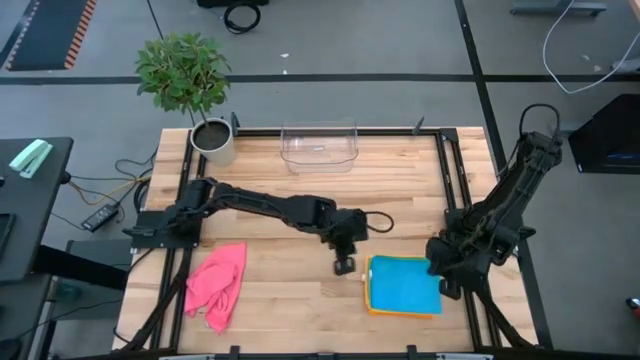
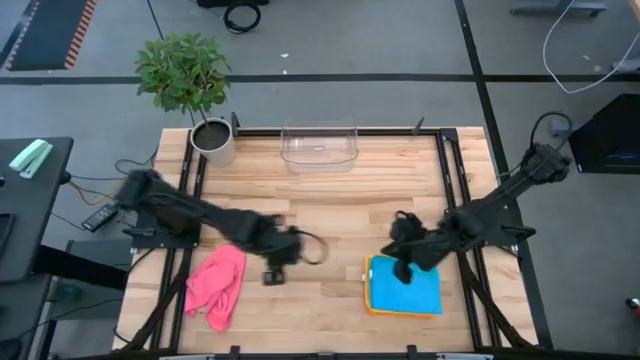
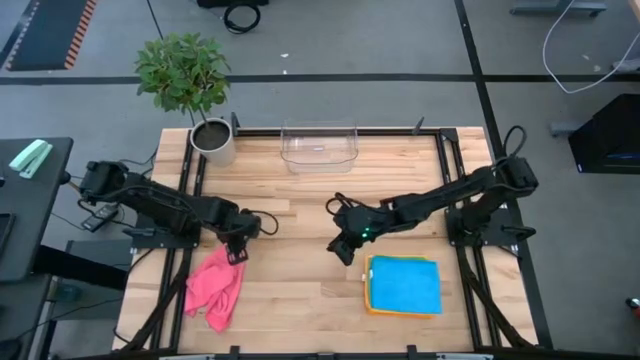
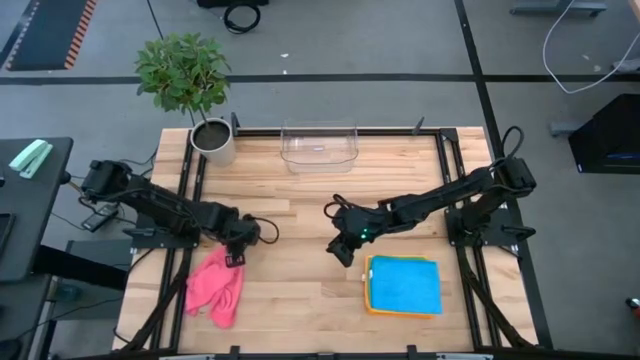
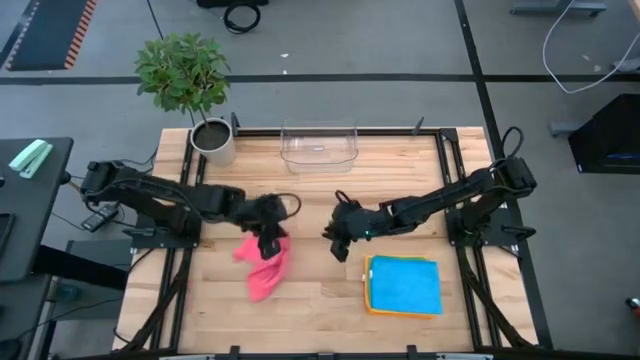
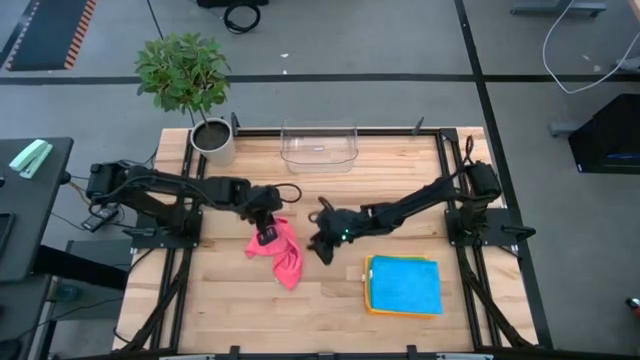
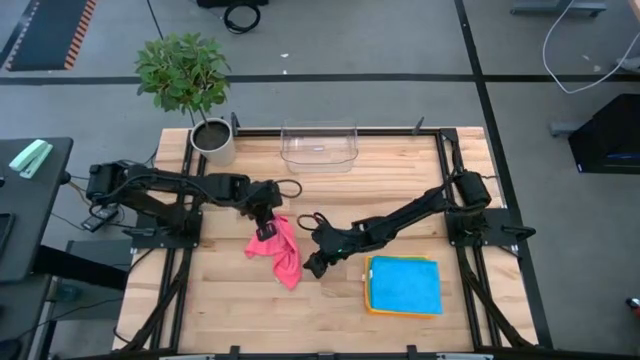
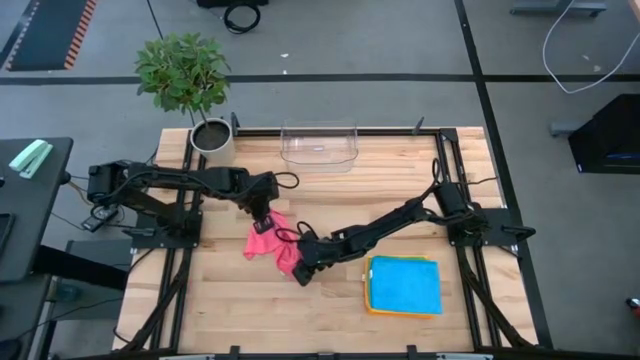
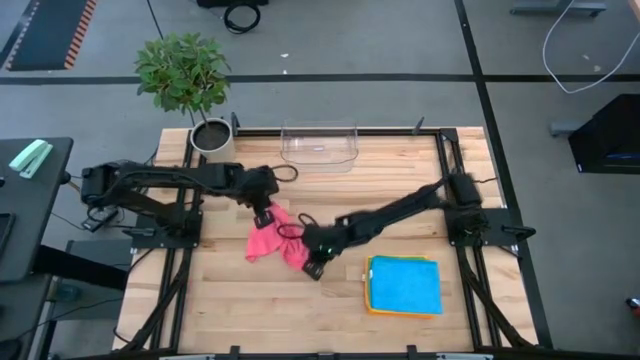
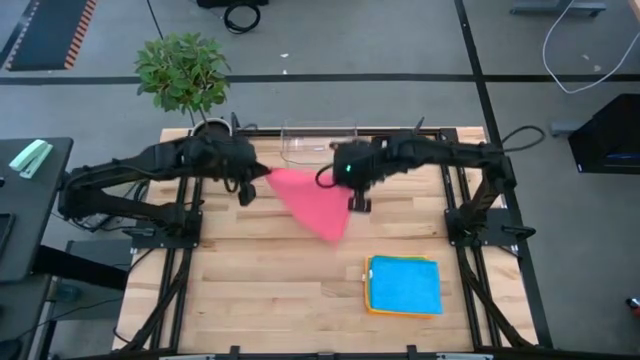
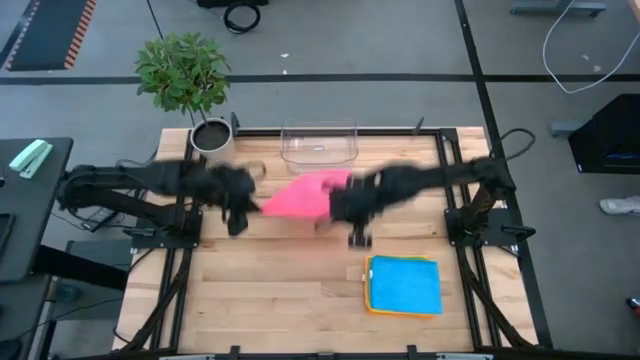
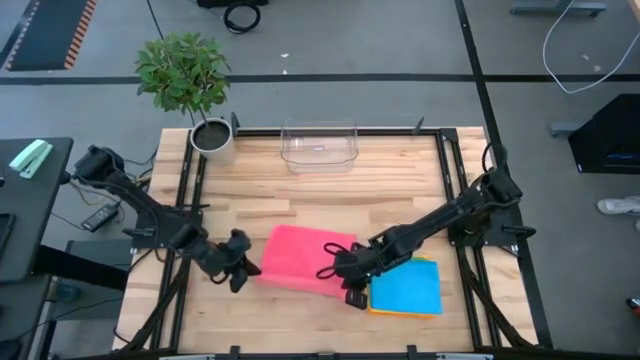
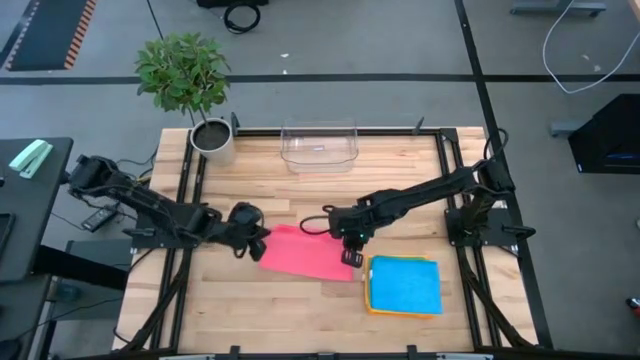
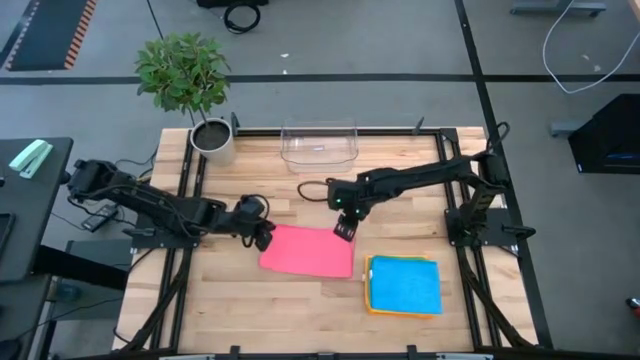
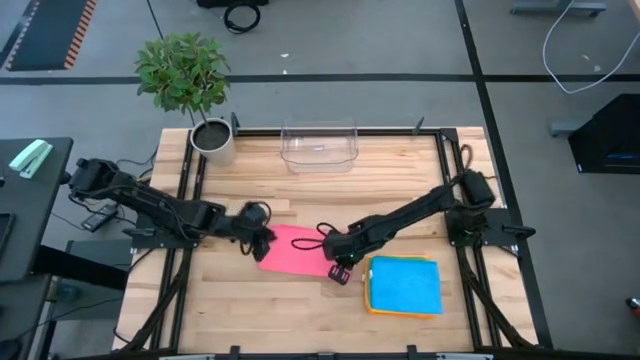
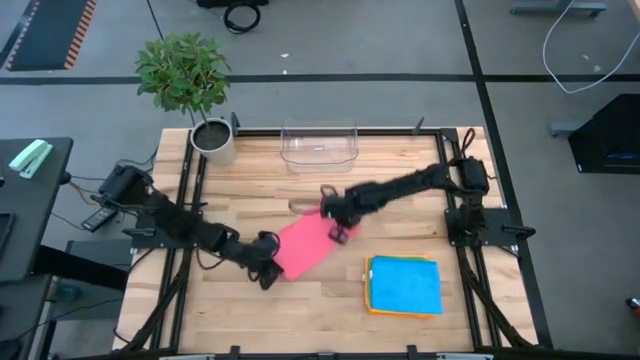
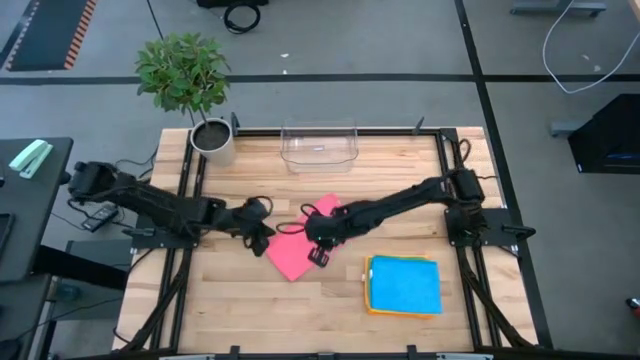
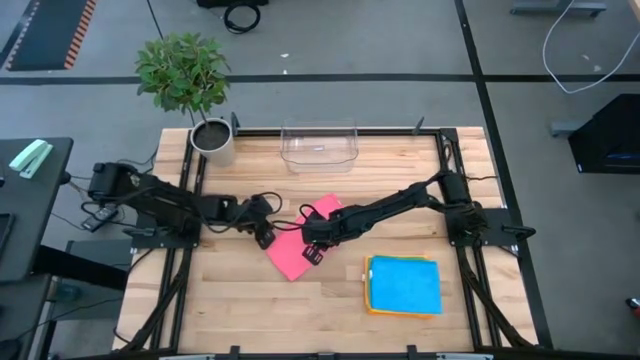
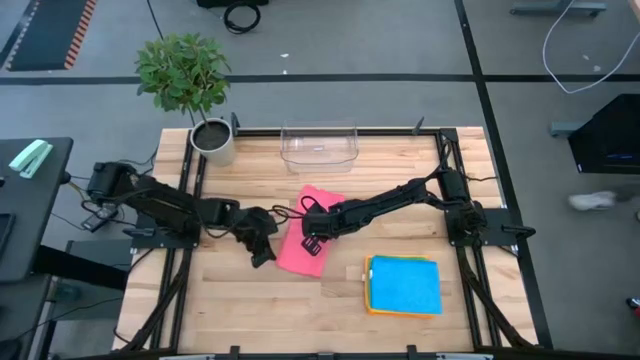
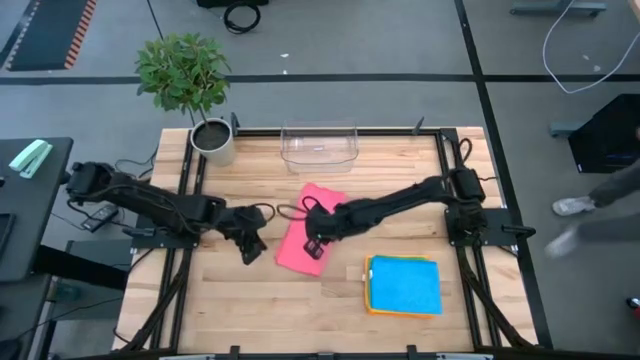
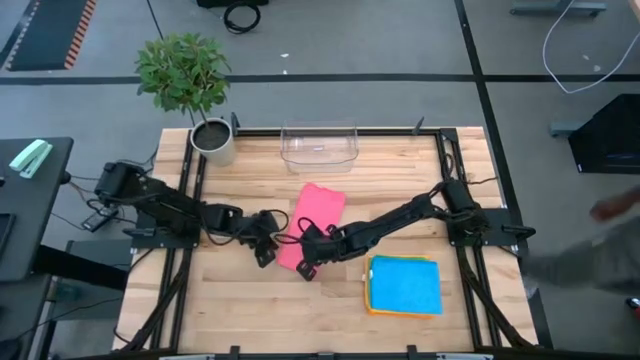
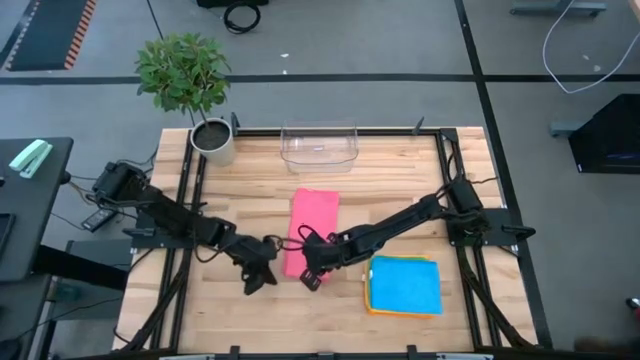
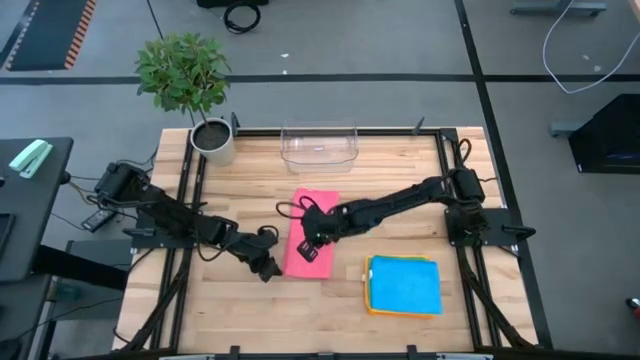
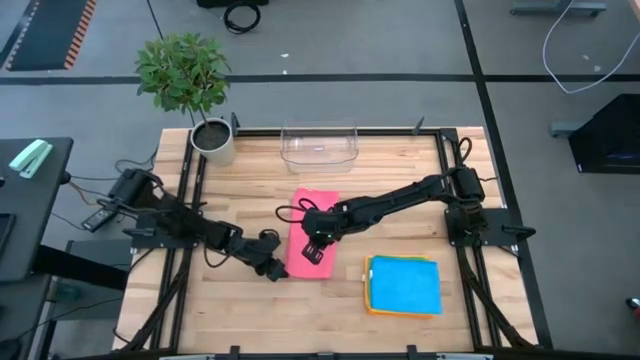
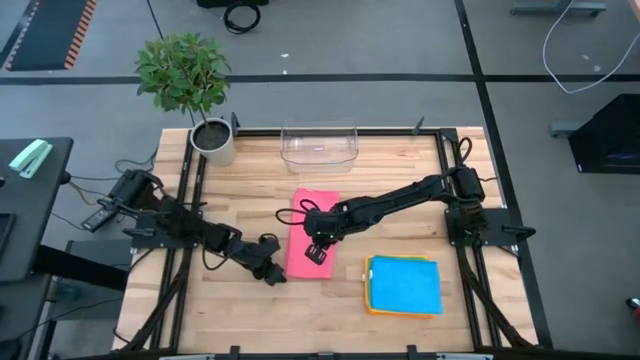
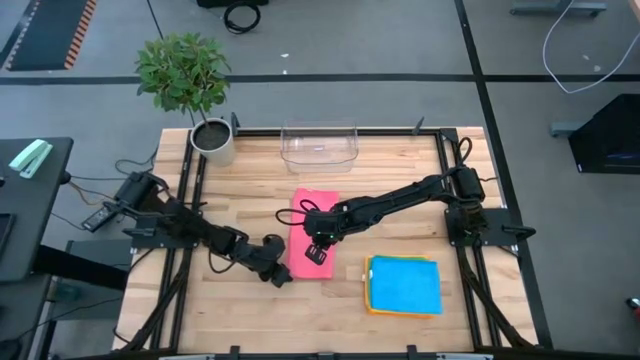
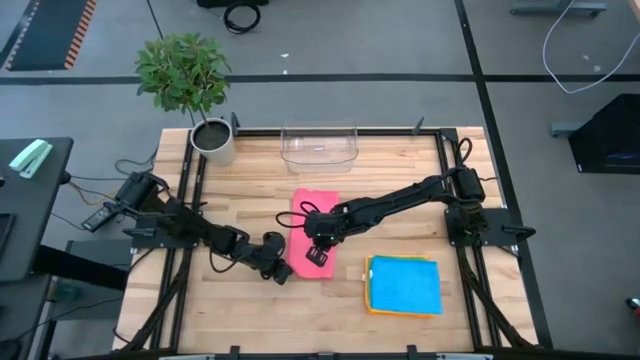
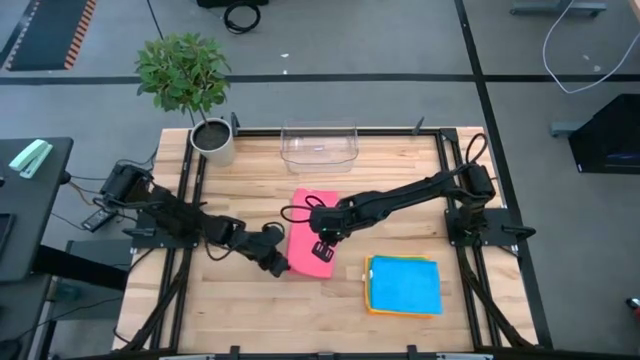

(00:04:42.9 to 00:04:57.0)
Task: Fold microfiber towels
Fold the pink towel on the table

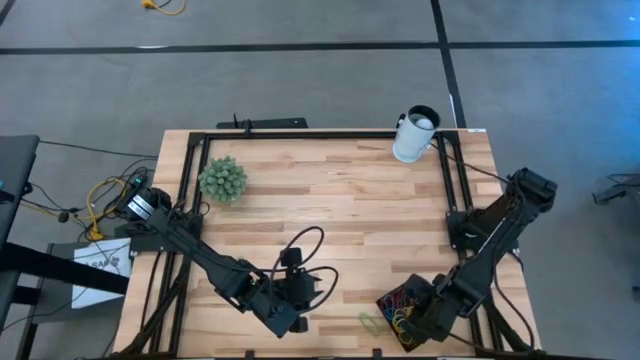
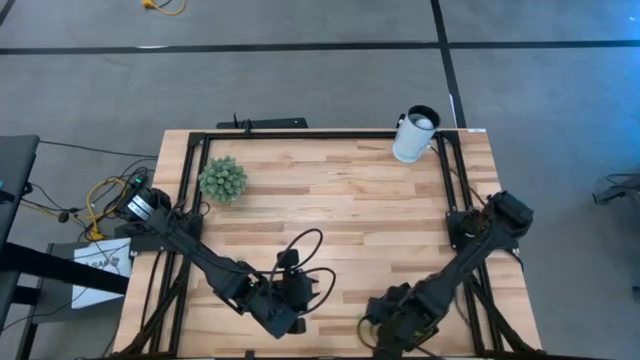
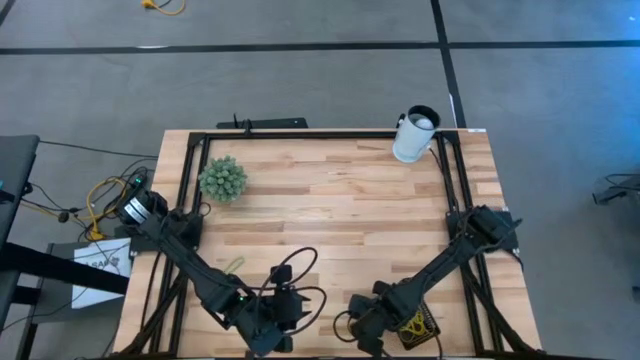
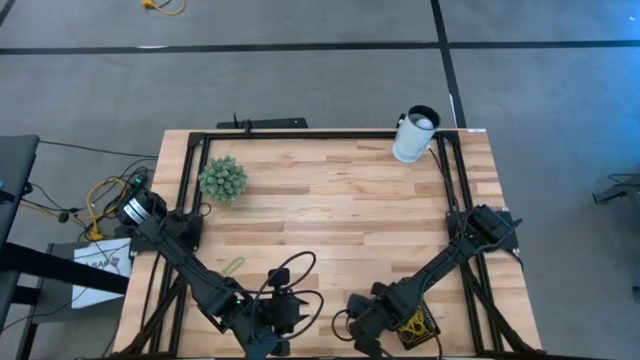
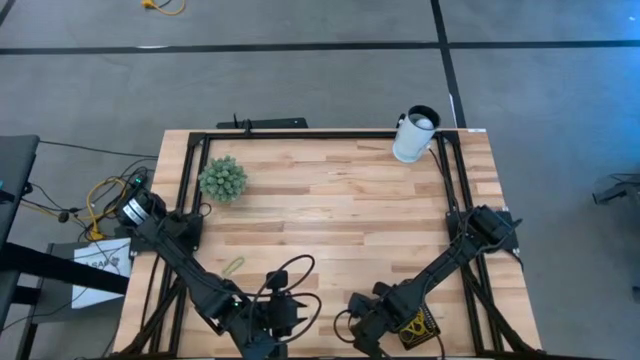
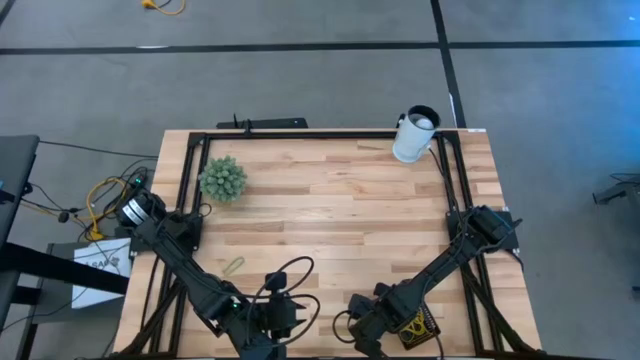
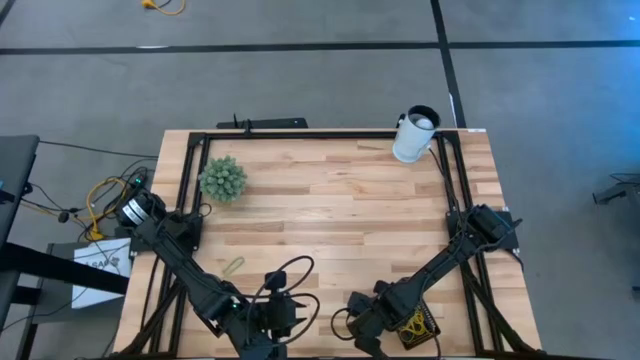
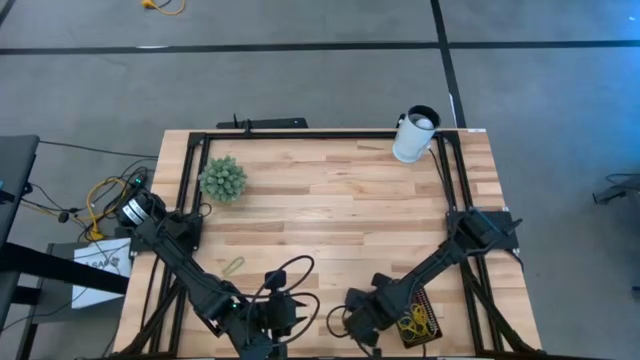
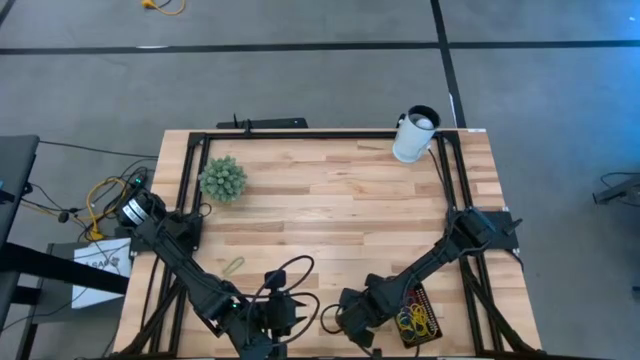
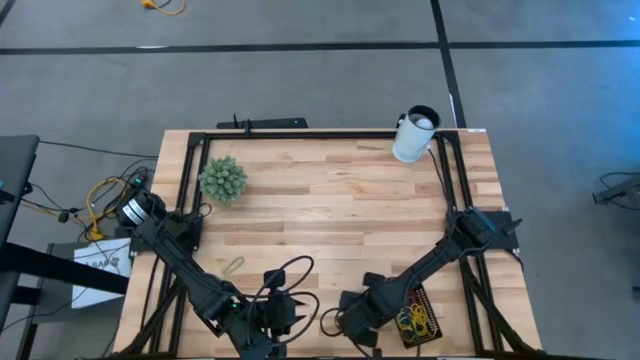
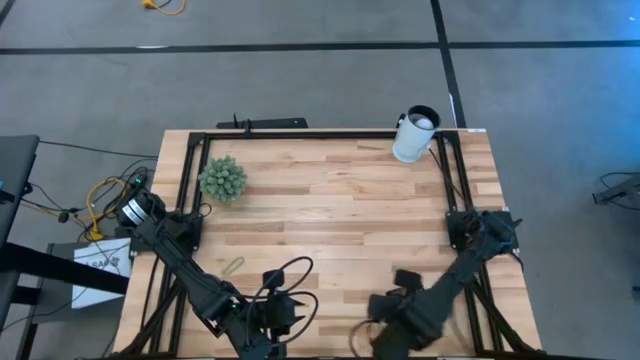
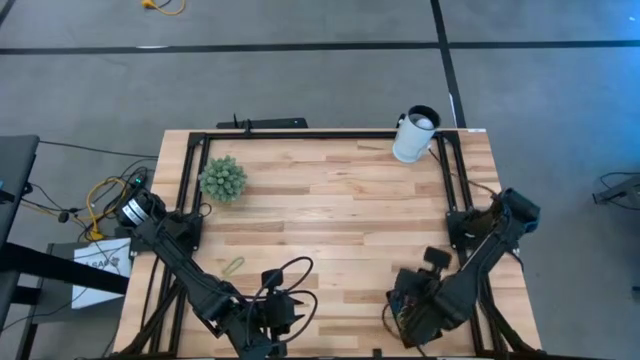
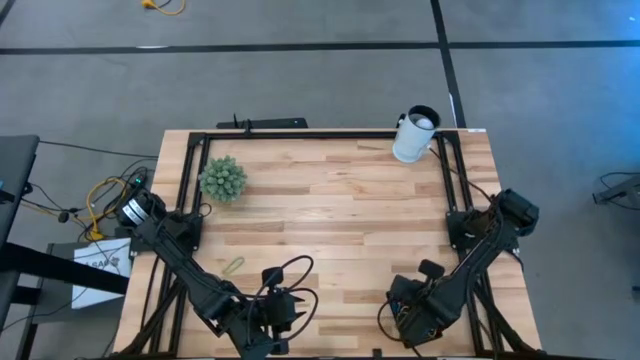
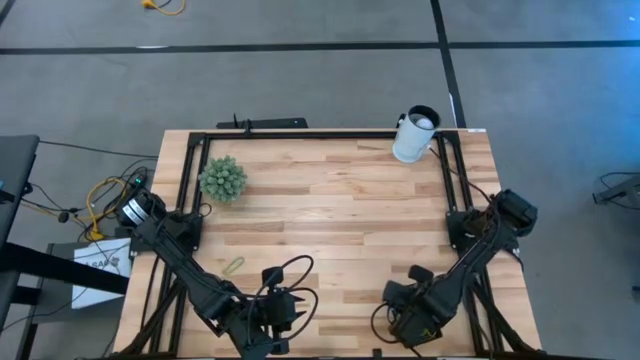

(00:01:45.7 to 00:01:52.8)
Task: Pick and place rubber bands into bin
Put the green rubber band into the black basket
